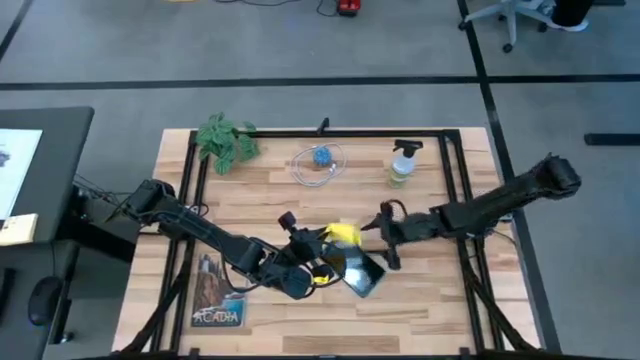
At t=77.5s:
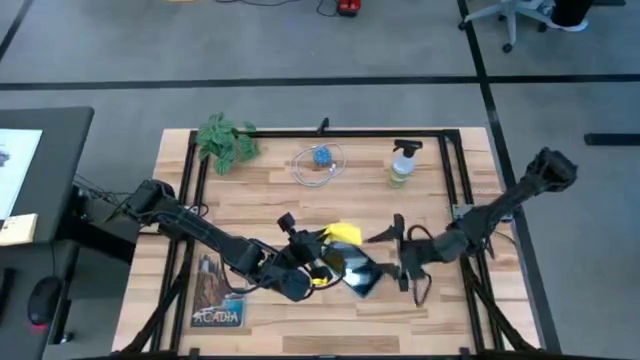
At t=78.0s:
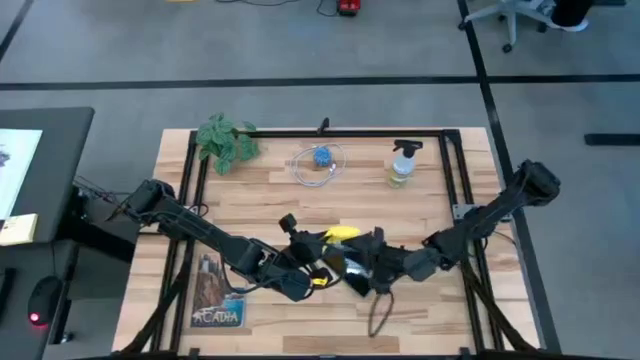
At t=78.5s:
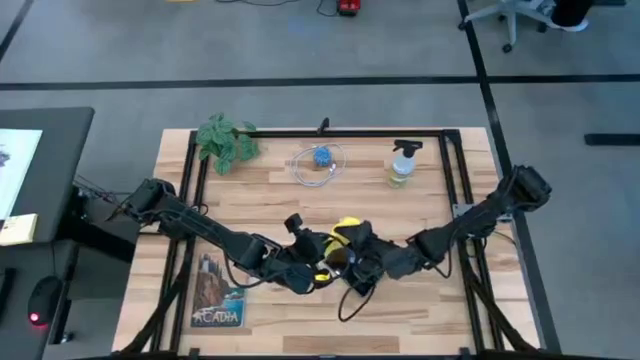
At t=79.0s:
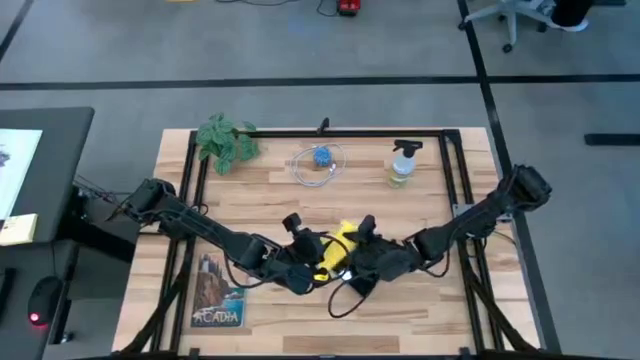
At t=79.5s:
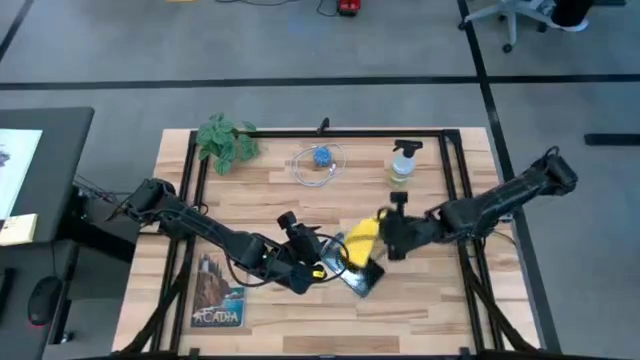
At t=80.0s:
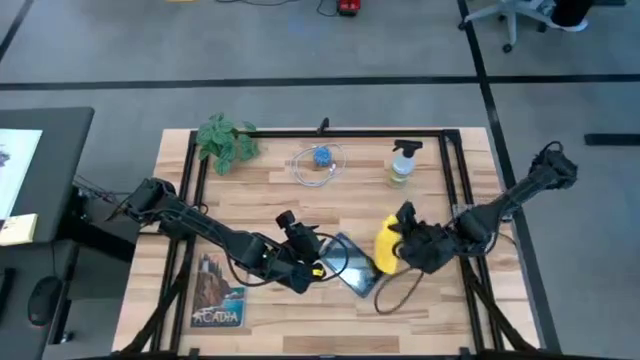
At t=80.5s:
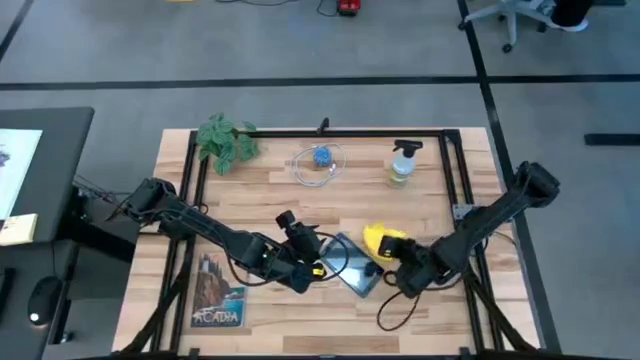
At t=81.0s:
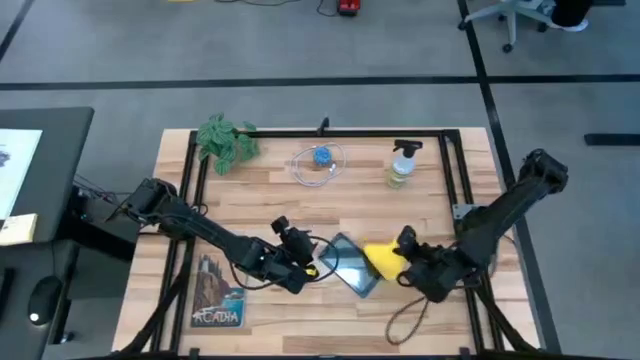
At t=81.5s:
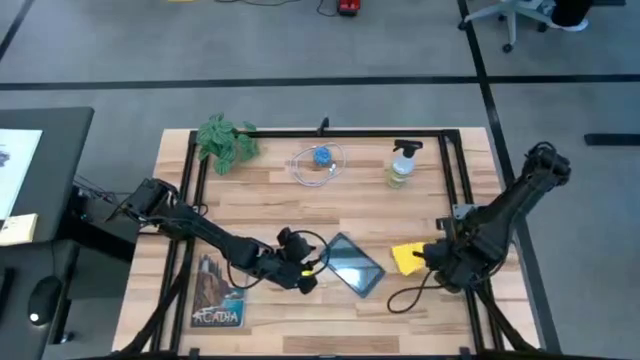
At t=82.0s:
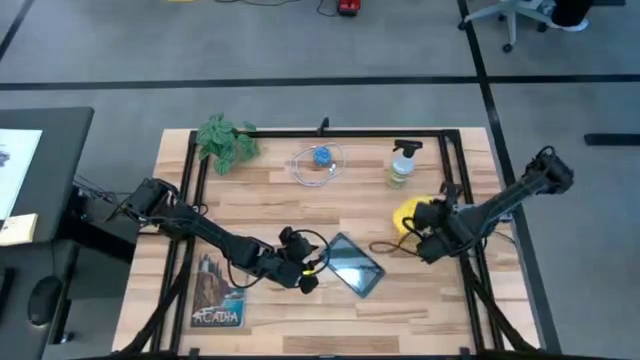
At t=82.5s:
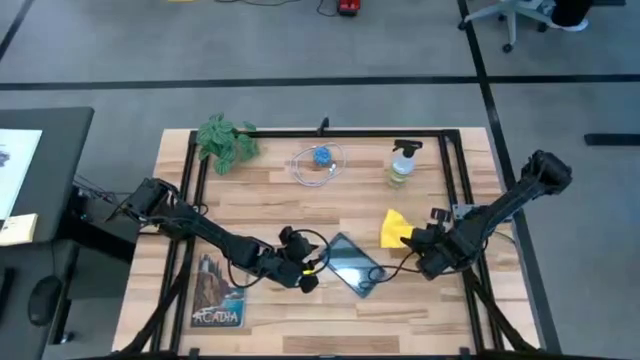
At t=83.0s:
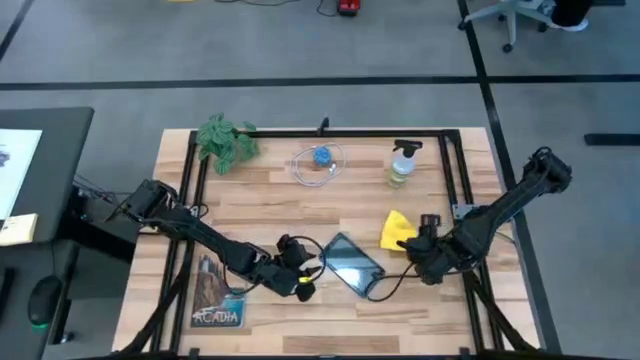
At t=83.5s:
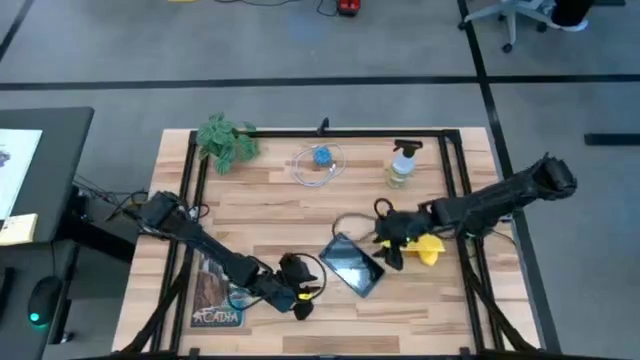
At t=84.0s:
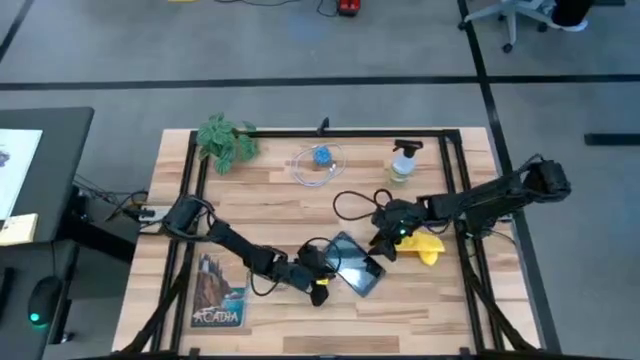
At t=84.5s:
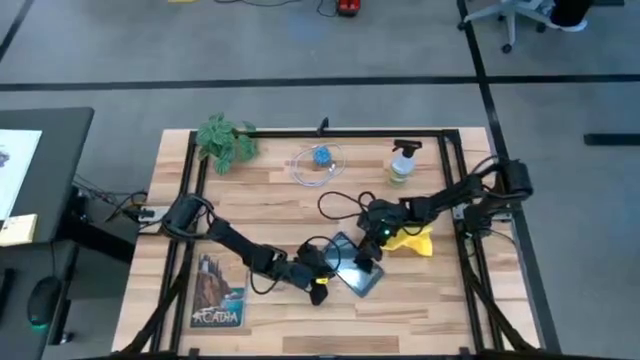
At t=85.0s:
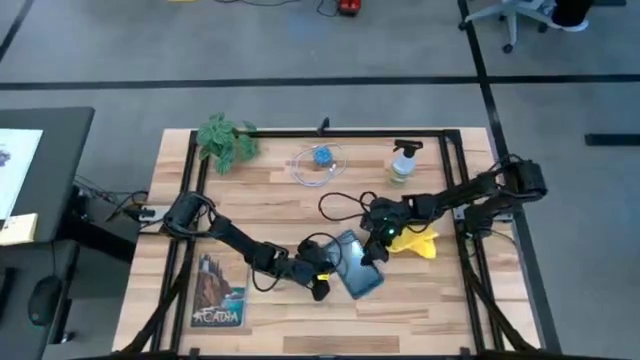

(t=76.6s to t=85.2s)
Task: Apply microfiber cloth
Wipe the back of the tablet with the yellow microfiber cloth

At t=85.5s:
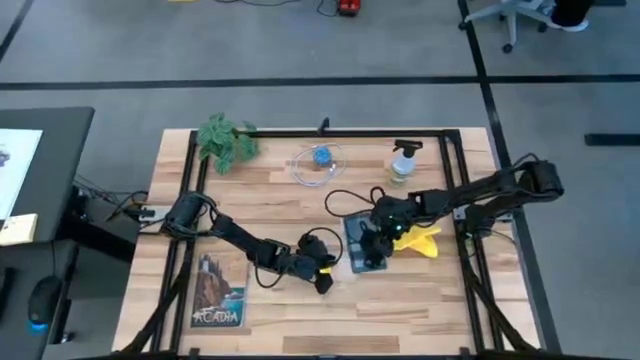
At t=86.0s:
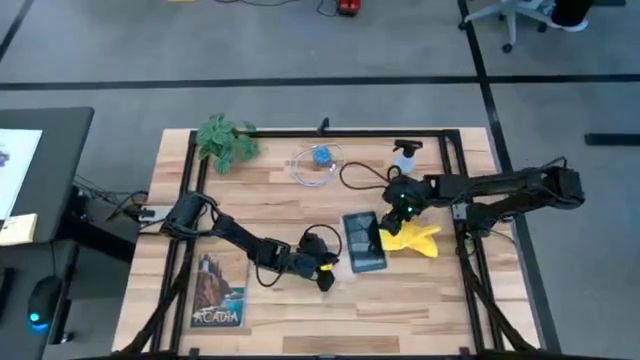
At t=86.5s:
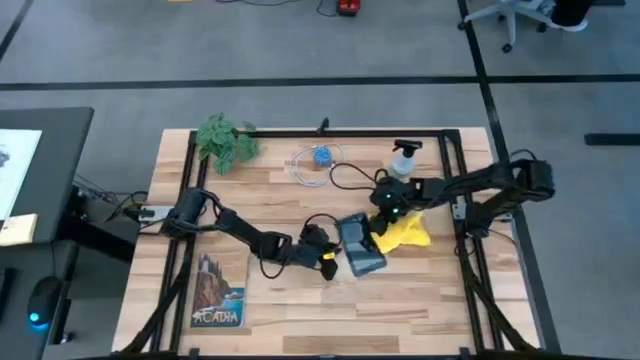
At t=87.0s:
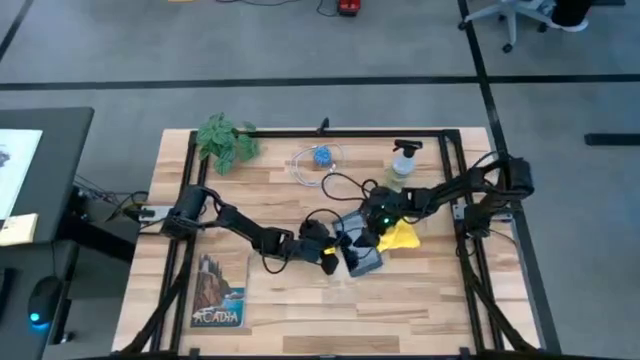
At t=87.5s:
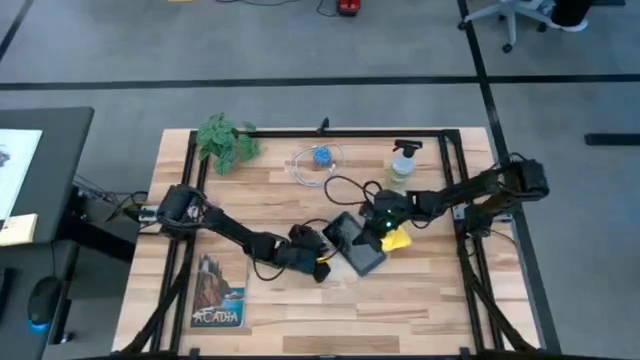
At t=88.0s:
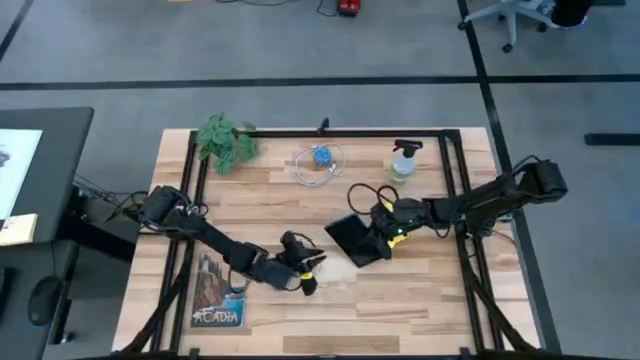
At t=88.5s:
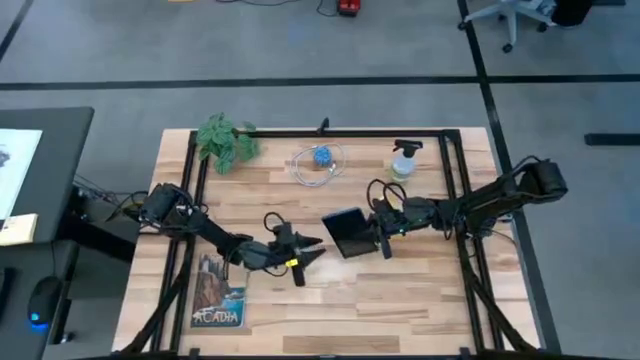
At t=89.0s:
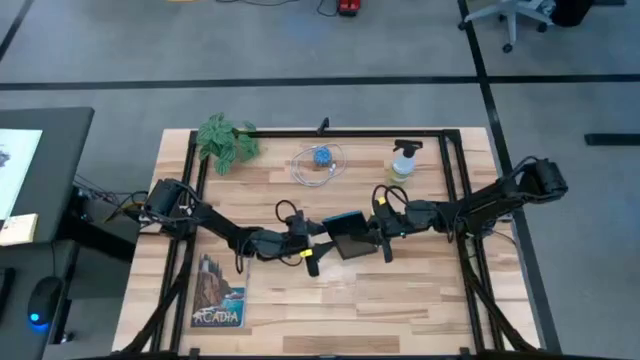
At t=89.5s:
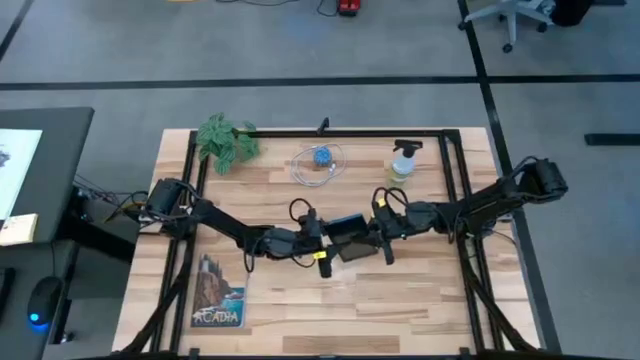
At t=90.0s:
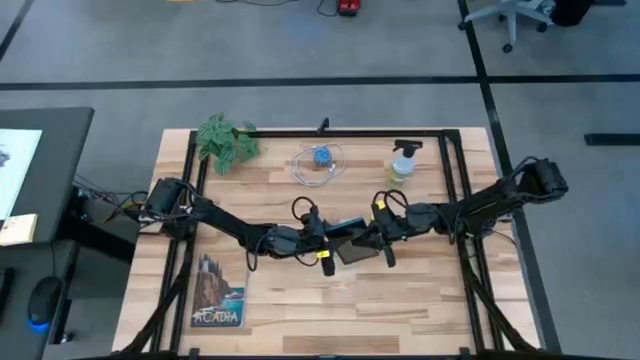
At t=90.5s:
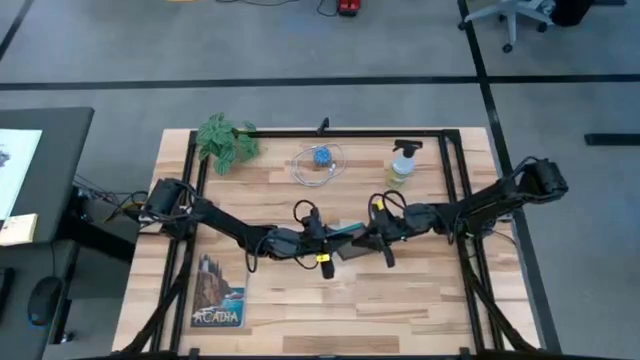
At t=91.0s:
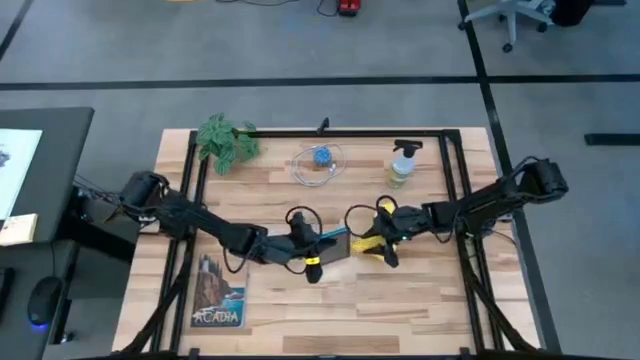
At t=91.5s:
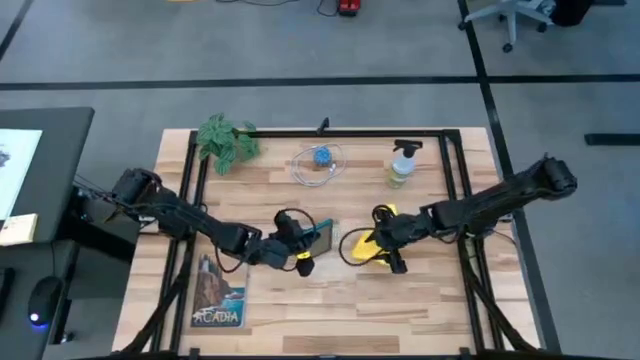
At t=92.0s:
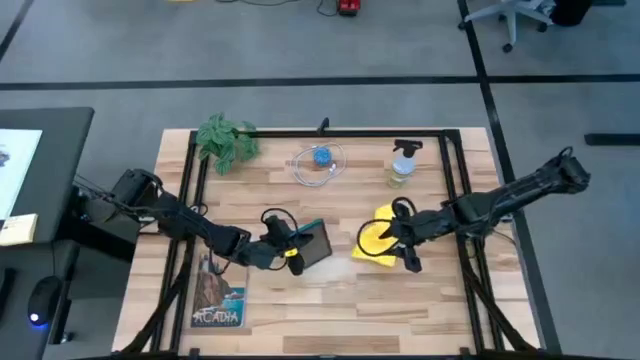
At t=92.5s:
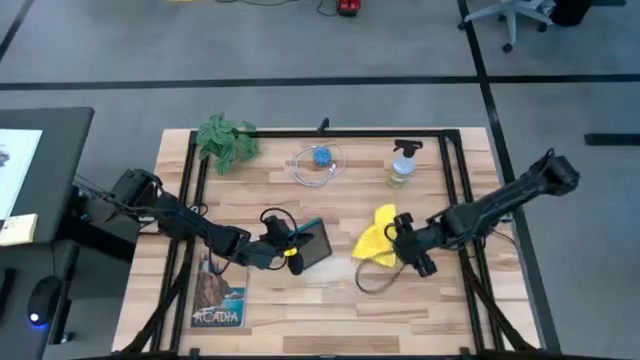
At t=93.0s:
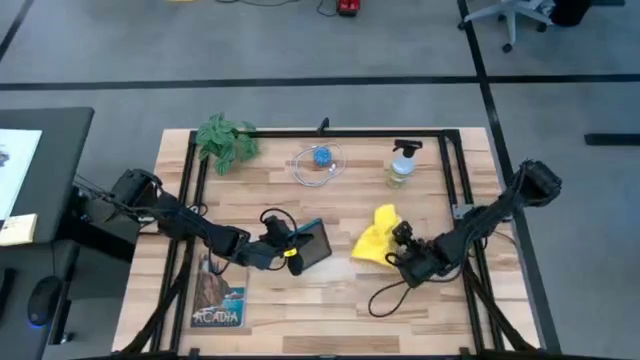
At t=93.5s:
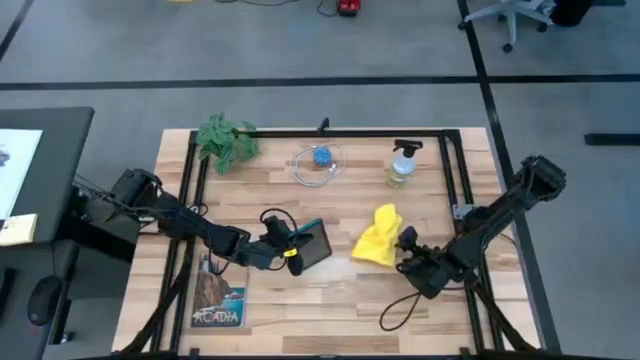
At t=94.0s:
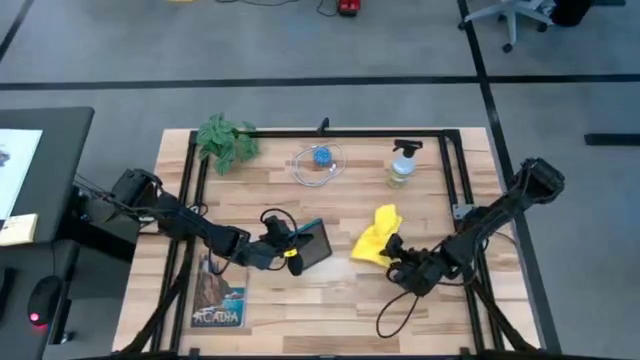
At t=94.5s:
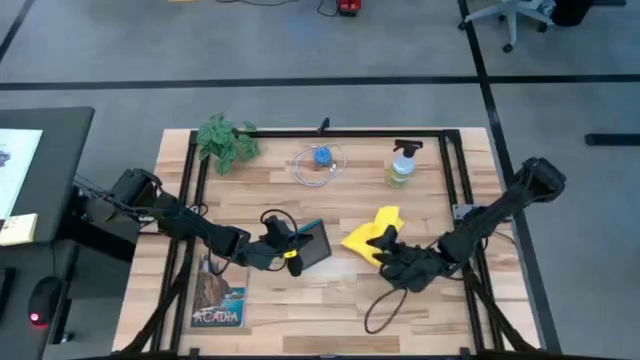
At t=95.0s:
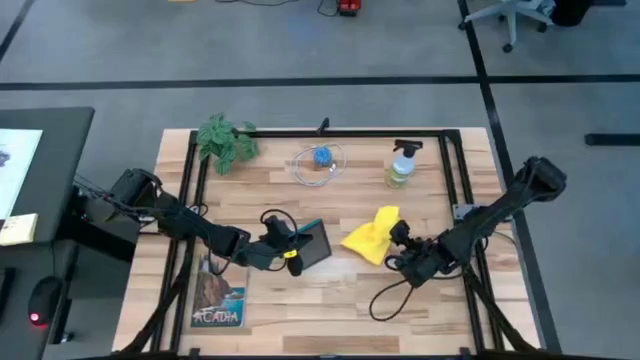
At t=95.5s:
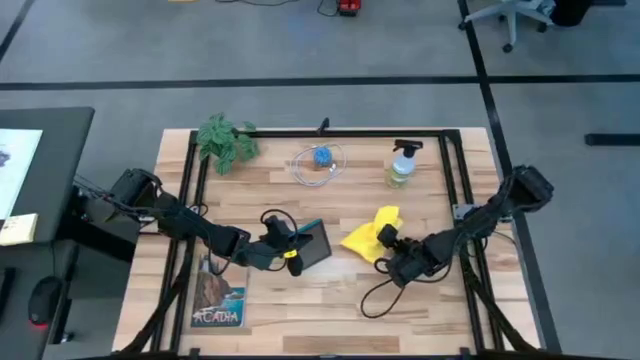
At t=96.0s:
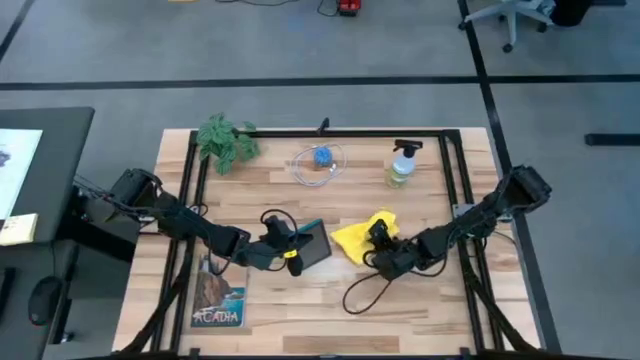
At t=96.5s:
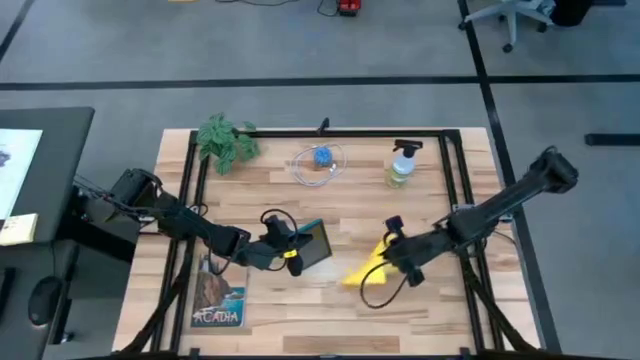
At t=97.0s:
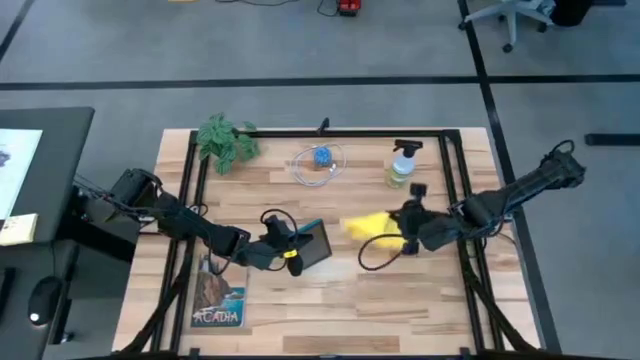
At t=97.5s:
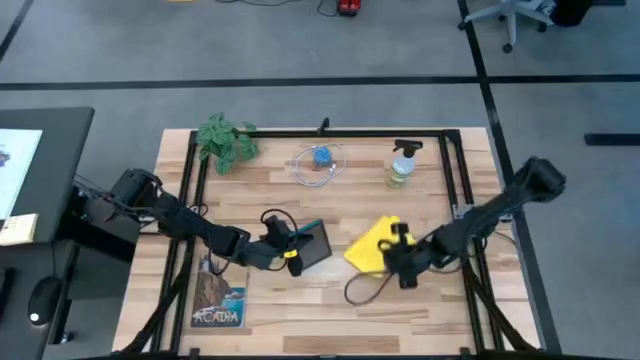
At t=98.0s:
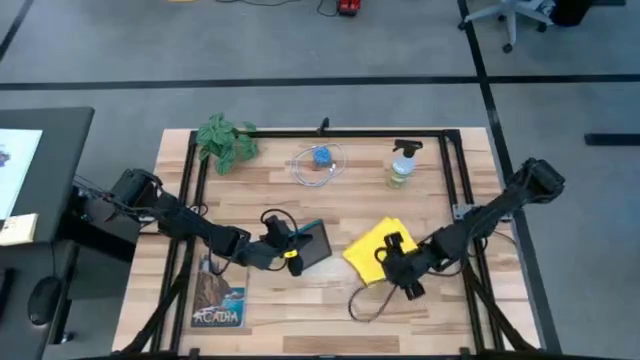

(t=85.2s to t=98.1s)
Wipe the back of the tablet with the yellow microfiber cloth
